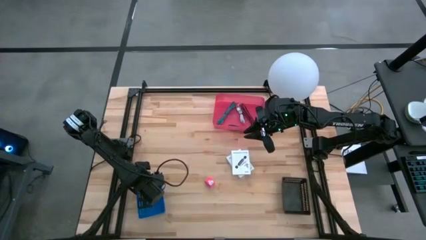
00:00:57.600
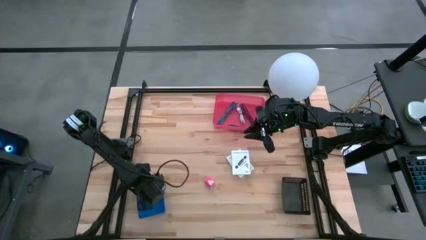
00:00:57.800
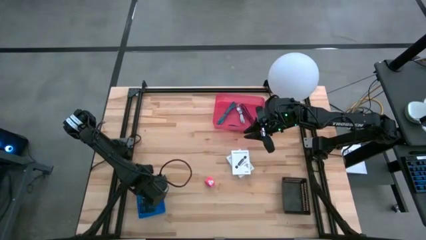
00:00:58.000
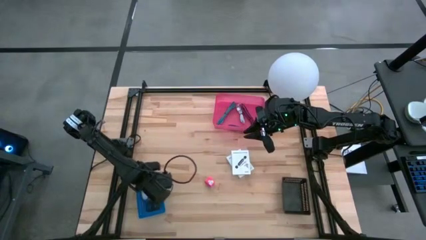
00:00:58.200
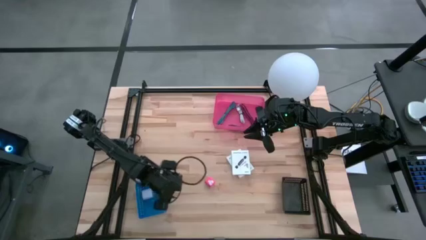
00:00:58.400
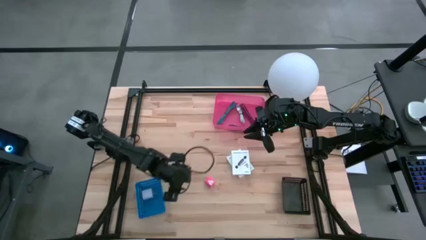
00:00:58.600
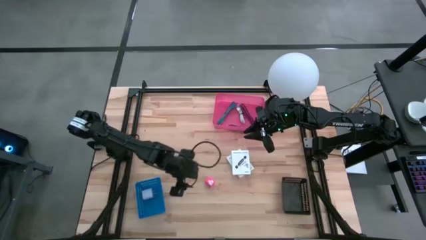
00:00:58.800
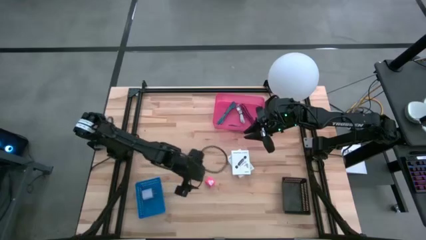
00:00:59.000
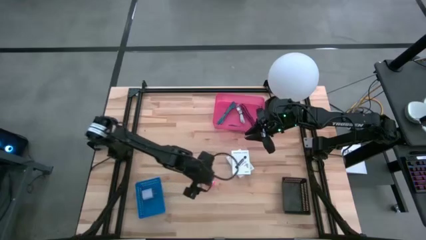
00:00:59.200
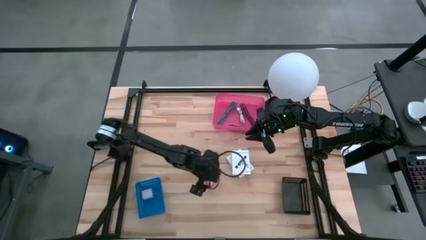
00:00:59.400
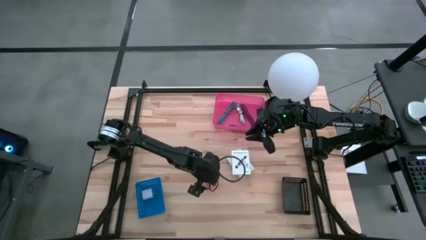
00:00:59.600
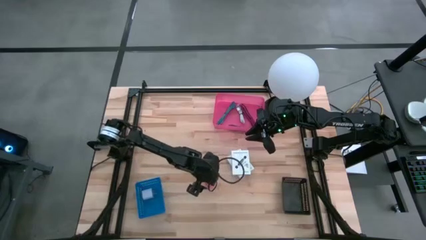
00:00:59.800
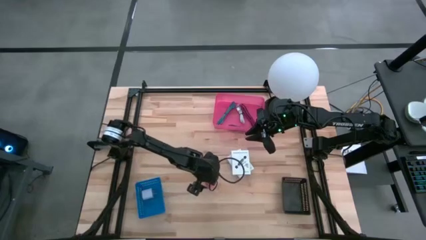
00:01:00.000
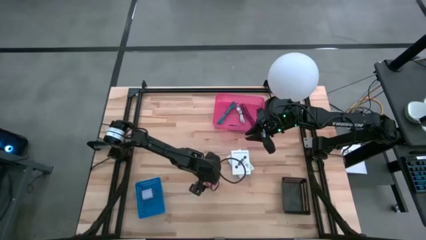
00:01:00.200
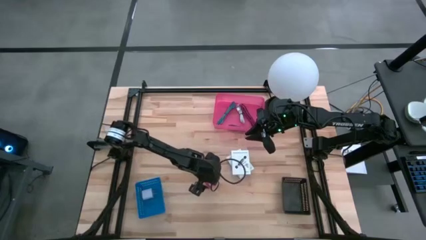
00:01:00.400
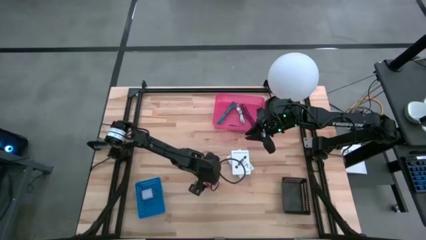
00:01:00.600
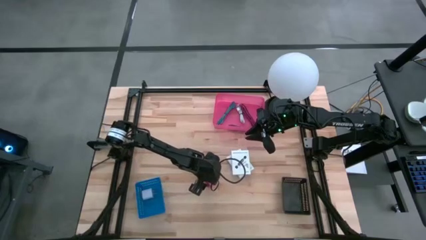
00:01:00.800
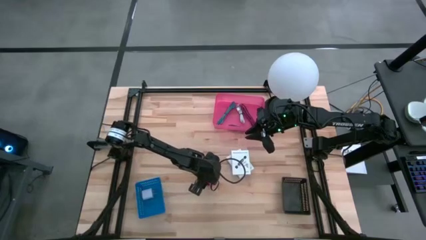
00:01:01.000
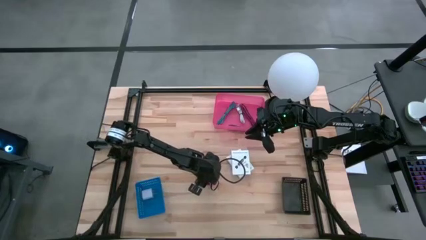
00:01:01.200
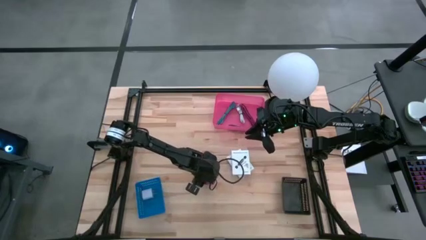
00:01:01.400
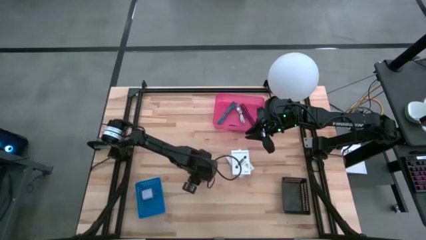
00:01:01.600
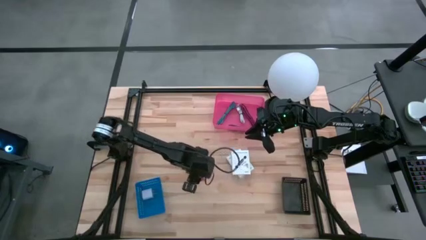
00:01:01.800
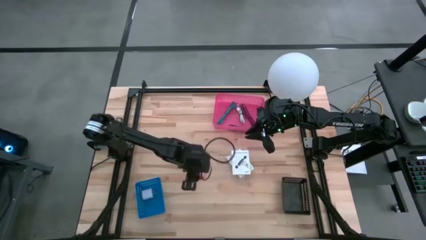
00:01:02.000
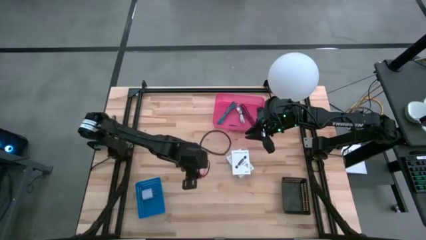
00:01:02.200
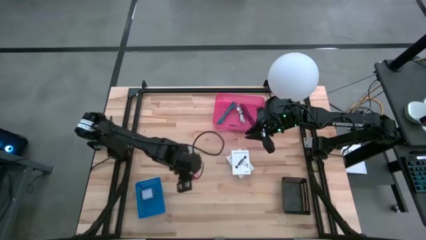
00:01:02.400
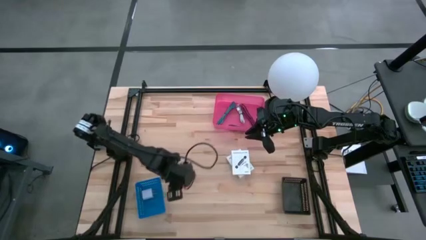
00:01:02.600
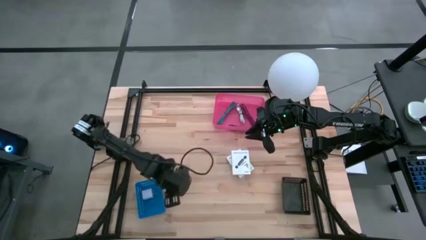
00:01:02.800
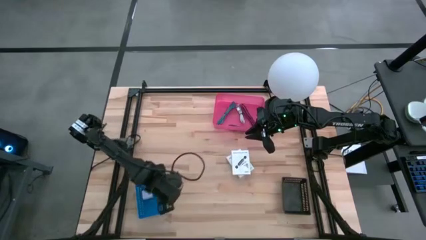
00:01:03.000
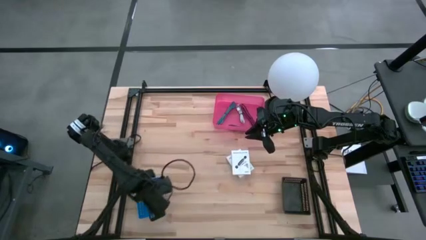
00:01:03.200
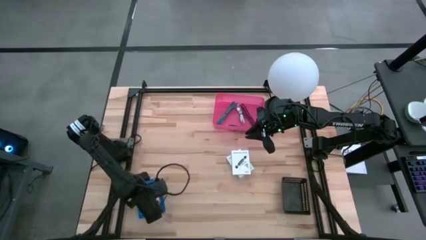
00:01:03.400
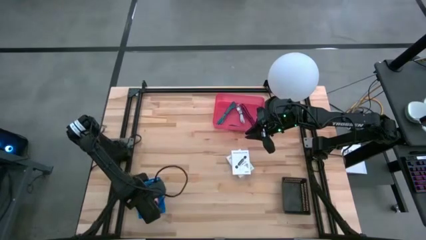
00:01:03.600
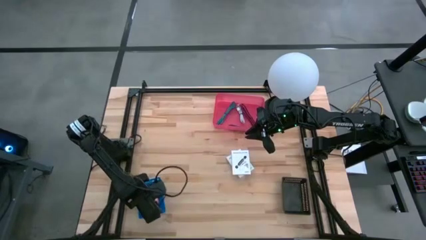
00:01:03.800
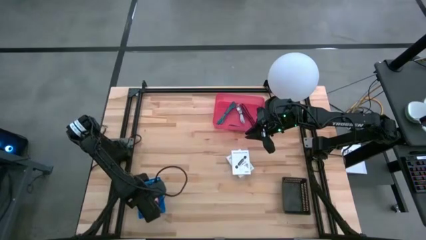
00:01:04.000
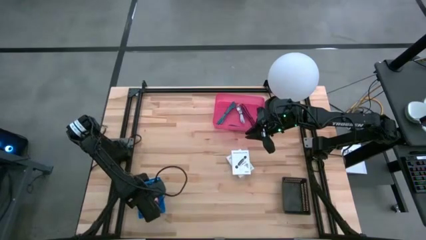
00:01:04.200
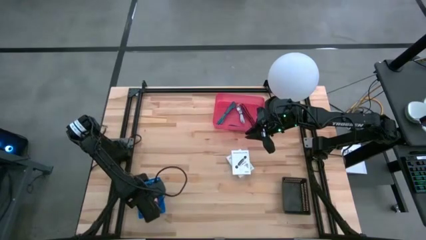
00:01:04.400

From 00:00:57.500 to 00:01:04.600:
Task: Pick and place items into bin
Put the pink charger adapter into the blue bin

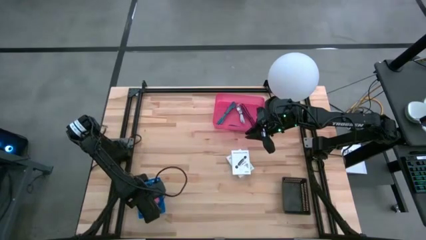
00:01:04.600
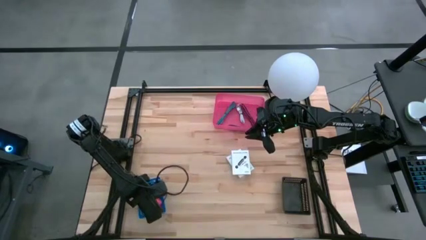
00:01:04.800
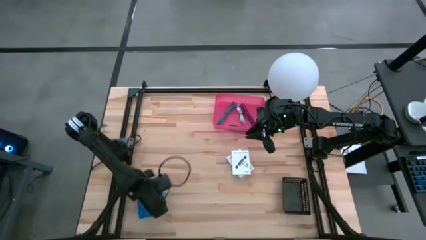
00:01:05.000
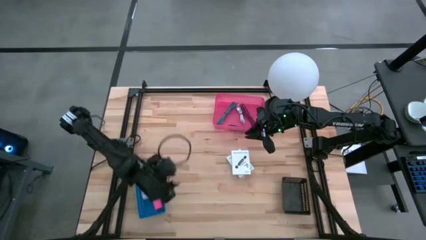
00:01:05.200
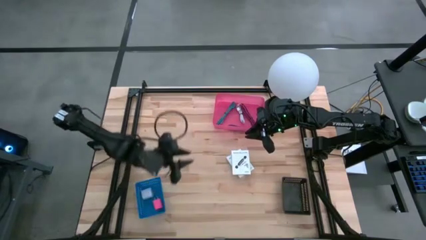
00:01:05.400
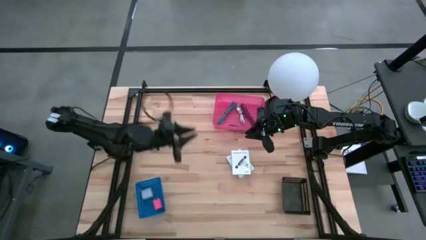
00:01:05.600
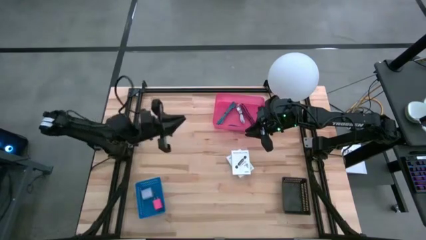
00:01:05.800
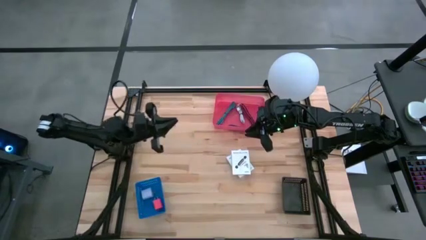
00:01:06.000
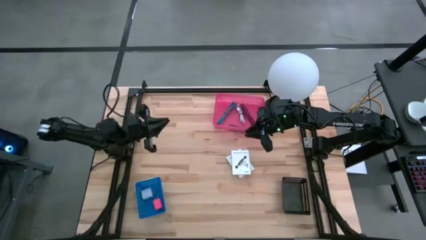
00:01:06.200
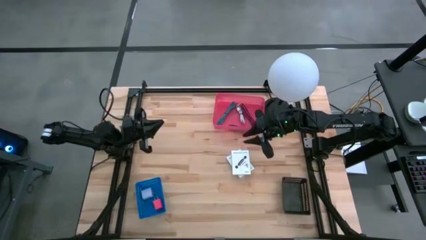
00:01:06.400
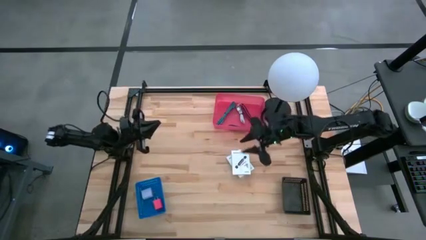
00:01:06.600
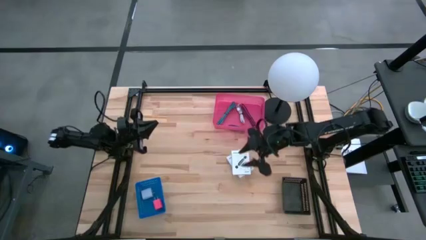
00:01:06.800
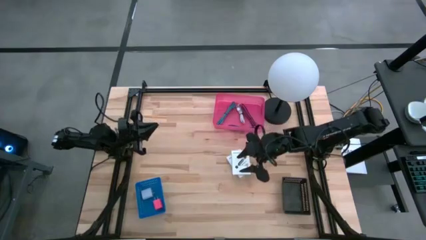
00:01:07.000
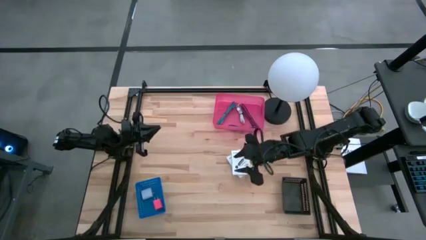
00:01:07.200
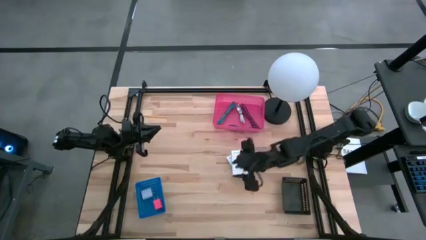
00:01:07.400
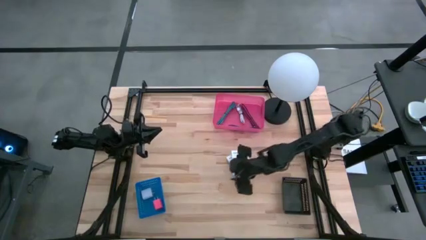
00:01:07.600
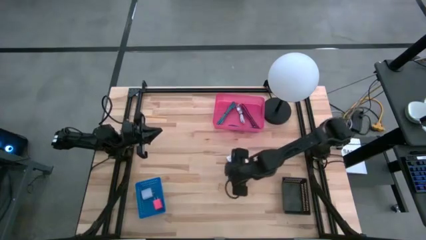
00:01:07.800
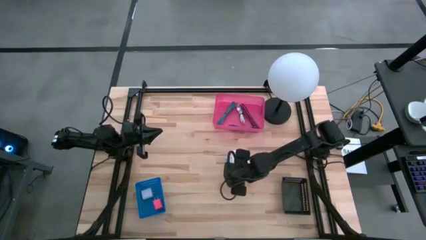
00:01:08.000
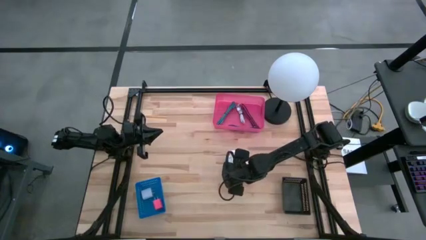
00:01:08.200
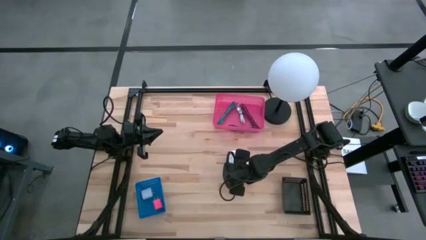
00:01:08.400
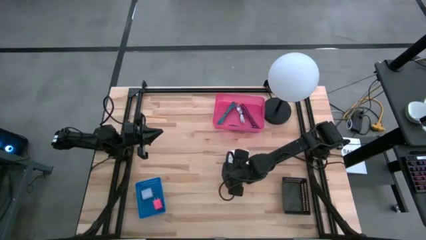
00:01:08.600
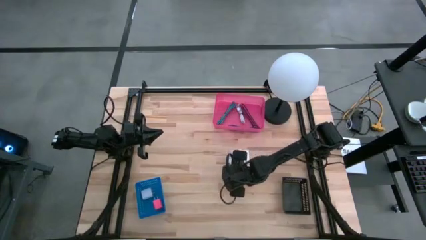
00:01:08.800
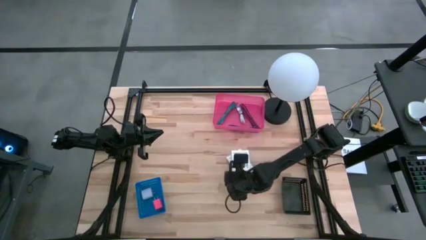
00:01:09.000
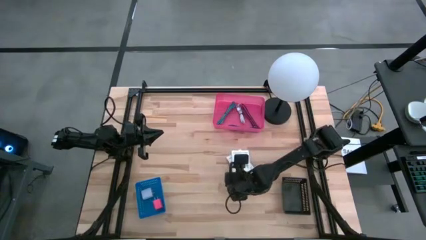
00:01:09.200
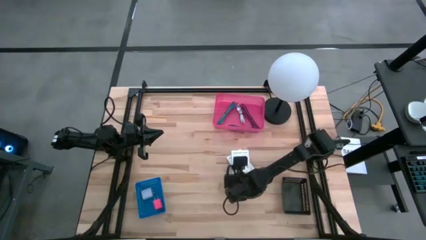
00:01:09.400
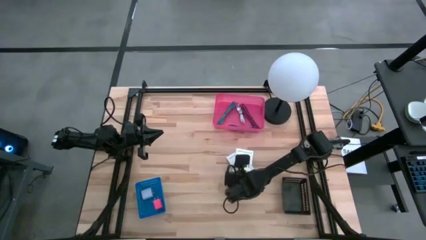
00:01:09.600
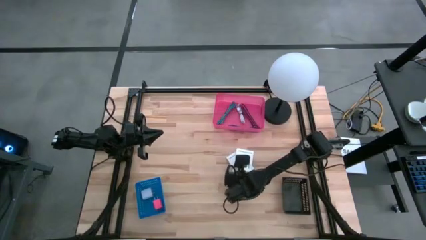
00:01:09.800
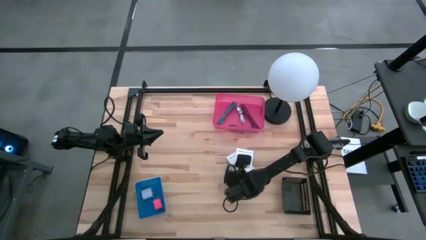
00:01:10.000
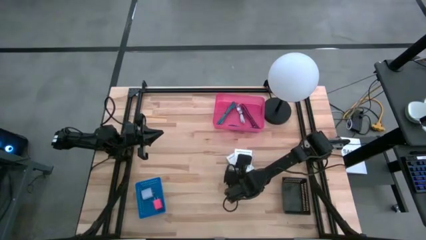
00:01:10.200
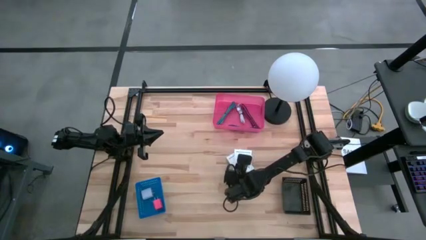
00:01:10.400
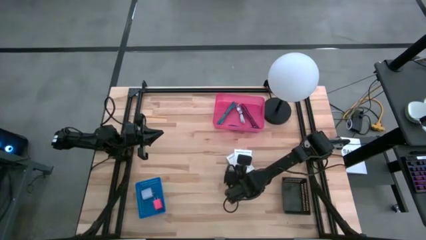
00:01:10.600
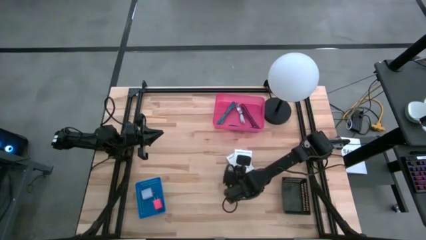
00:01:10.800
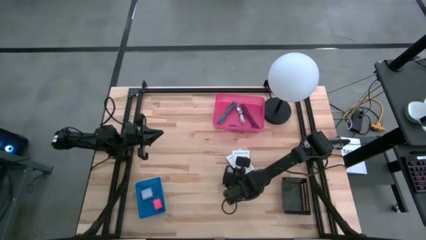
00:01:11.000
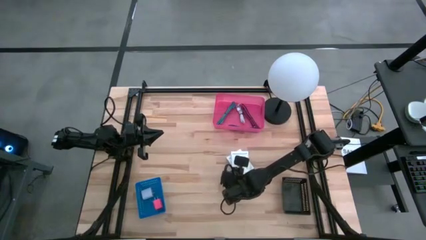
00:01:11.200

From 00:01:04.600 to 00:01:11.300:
Put the card reader box into the black bin

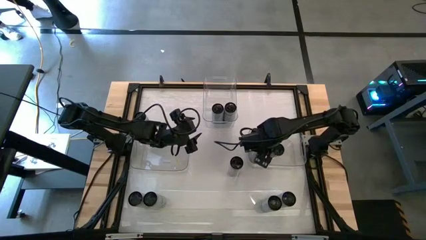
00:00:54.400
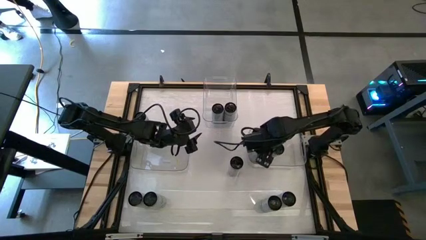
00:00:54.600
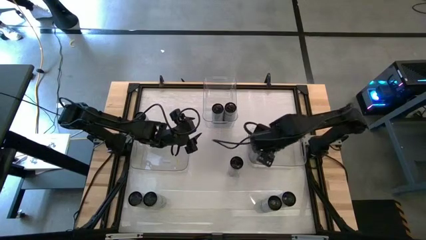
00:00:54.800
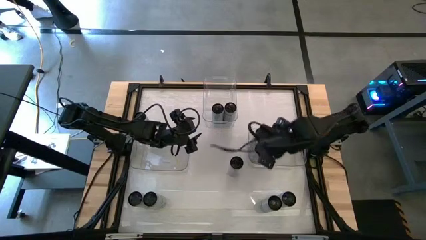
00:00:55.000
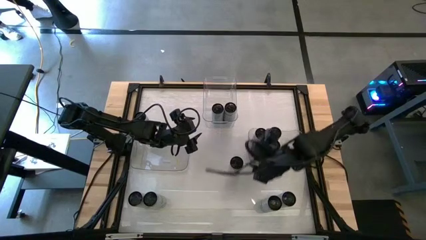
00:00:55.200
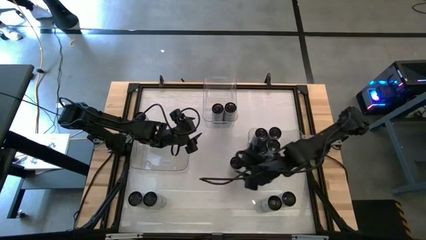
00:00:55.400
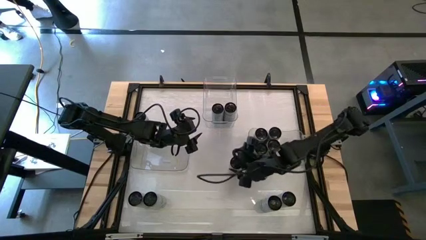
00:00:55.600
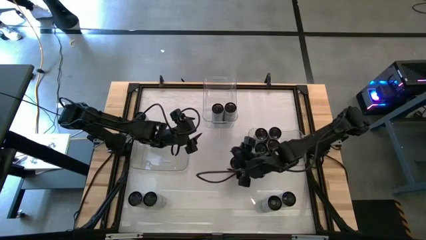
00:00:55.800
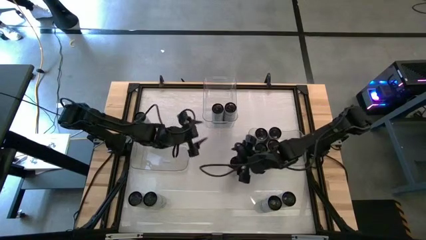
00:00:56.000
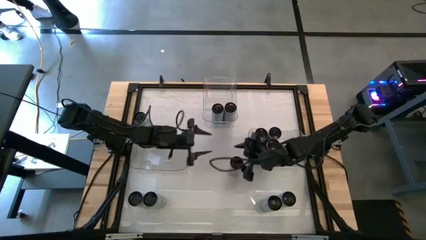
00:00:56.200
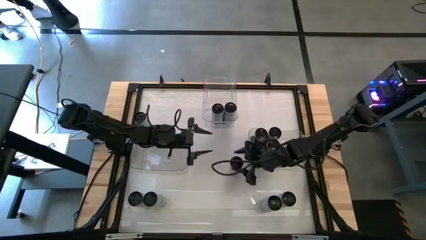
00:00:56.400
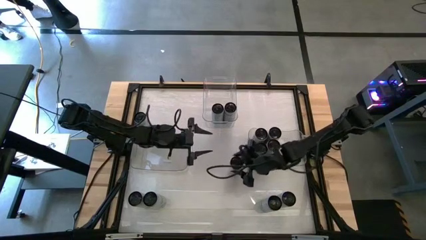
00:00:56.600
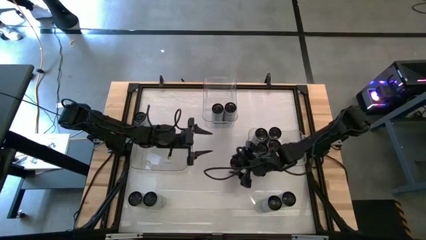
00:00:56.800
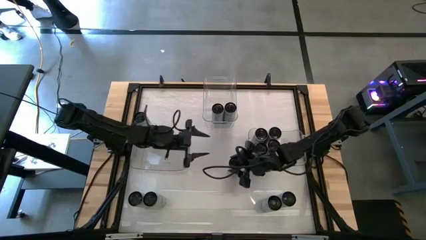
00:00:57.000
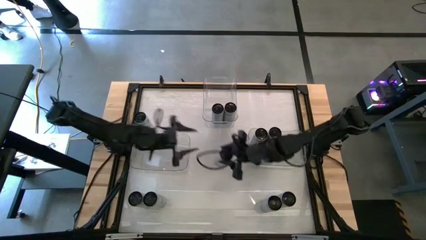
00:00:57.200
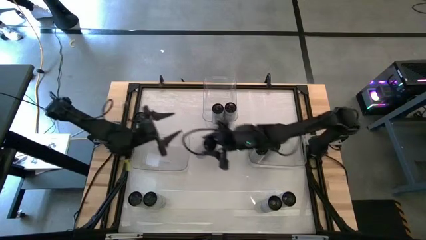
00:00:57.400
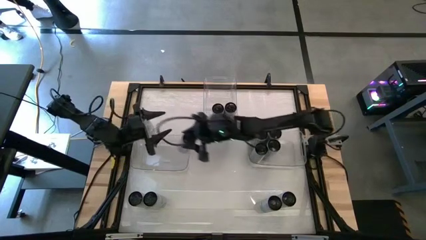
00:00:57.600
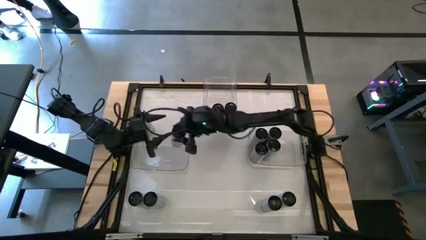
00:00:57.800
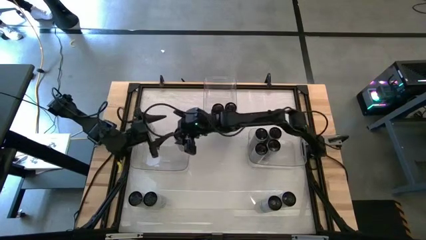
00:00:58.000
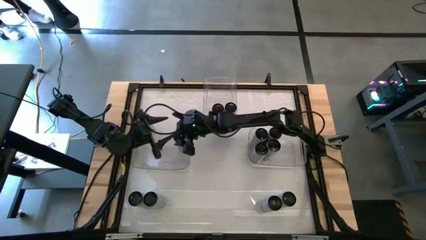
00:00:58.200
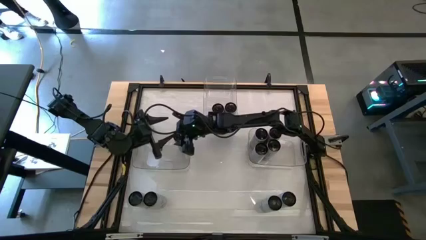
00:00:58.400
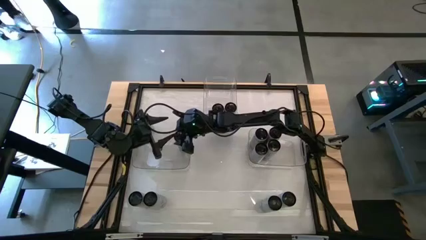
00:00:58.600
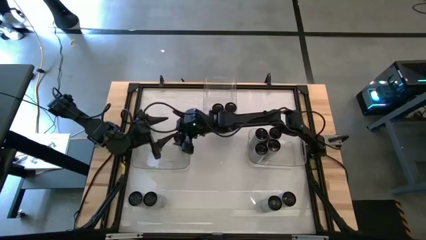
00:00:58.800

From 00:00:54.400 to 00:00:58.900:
Task: Sort soda cans
Put the middle right white-pink soda can into the bottom left transparent bin
